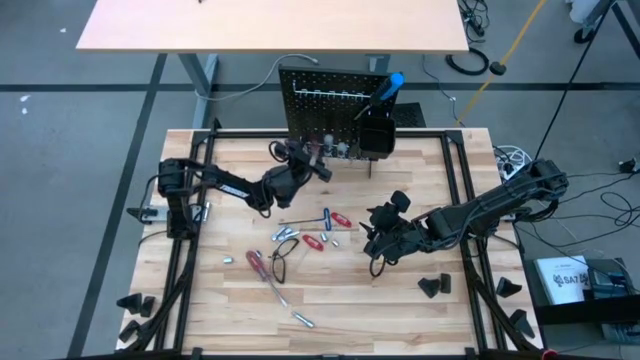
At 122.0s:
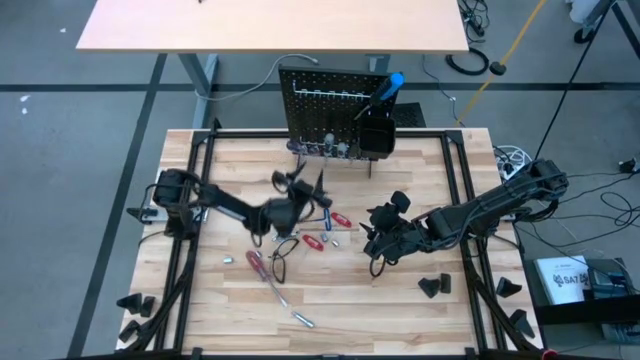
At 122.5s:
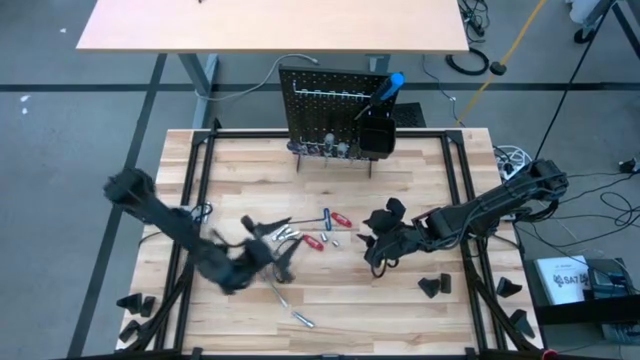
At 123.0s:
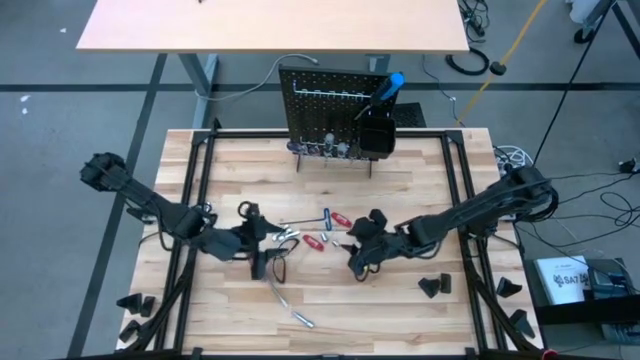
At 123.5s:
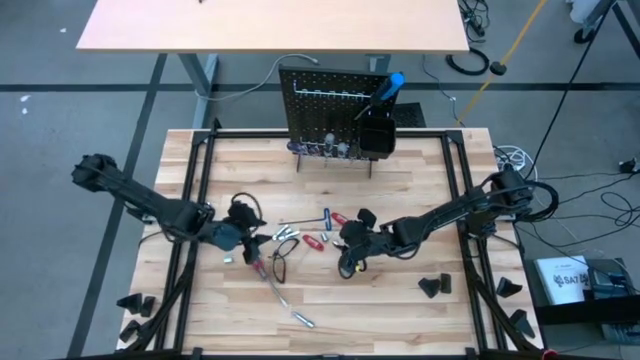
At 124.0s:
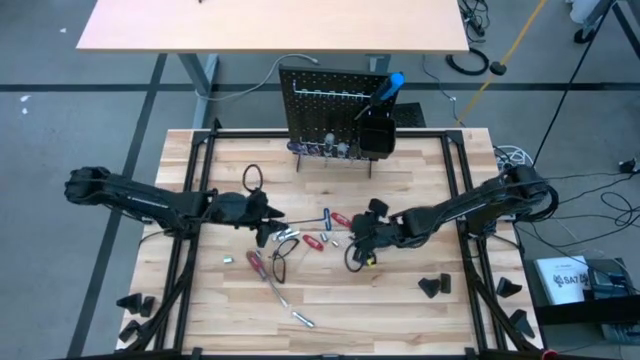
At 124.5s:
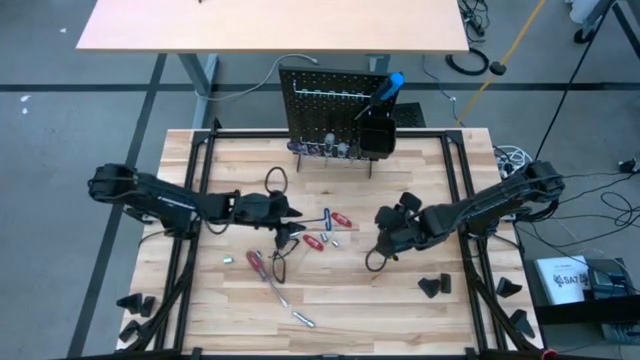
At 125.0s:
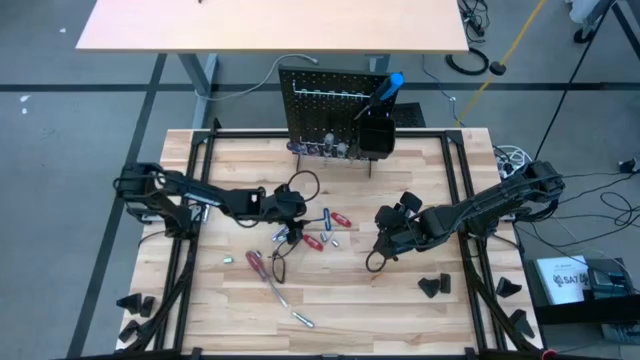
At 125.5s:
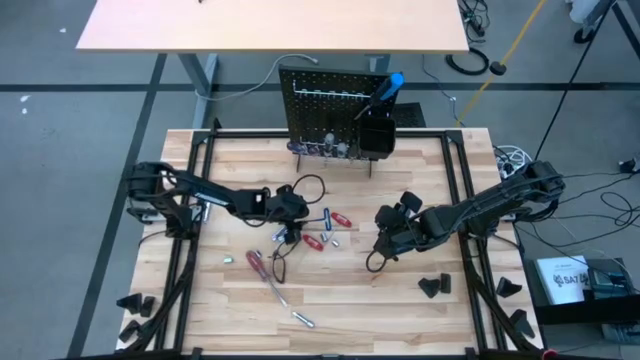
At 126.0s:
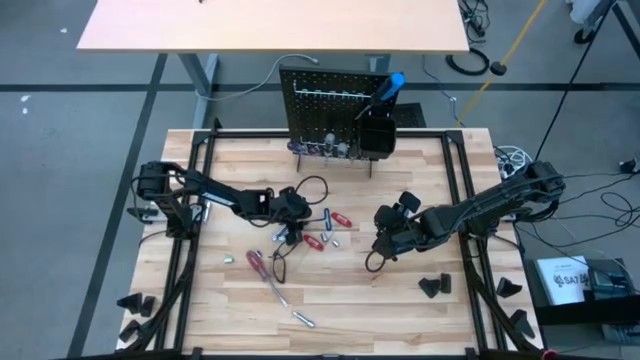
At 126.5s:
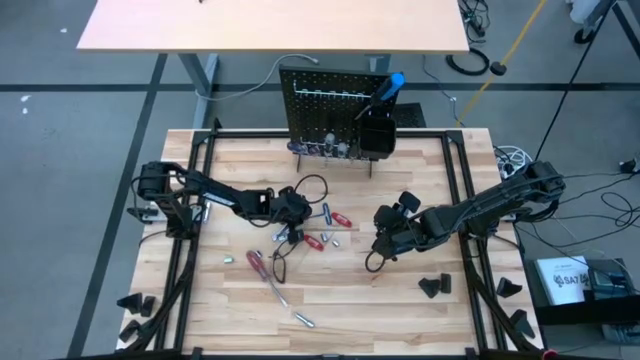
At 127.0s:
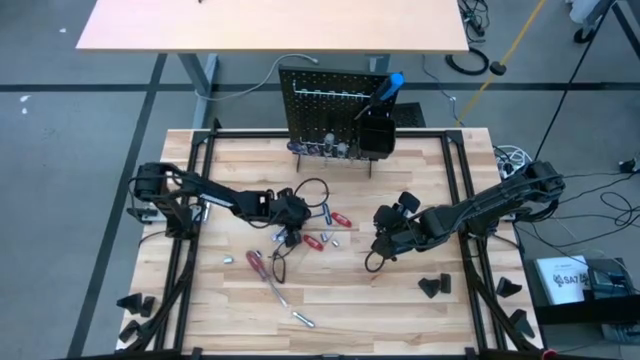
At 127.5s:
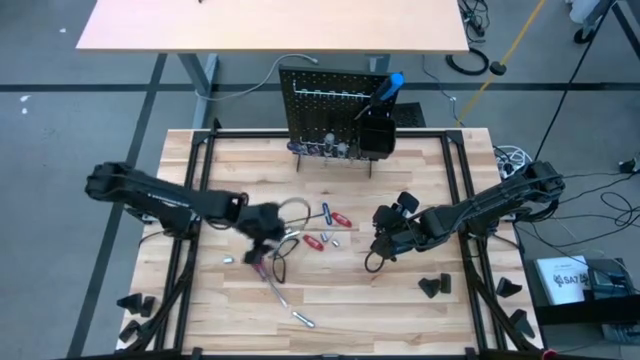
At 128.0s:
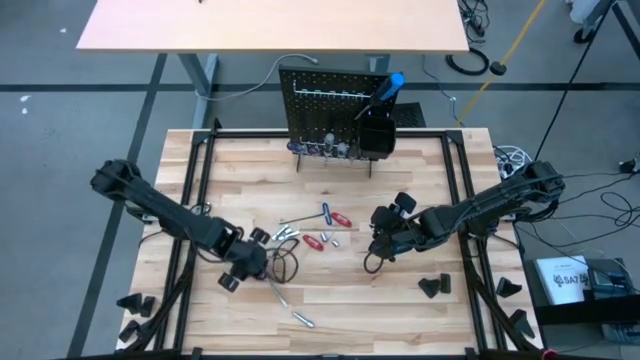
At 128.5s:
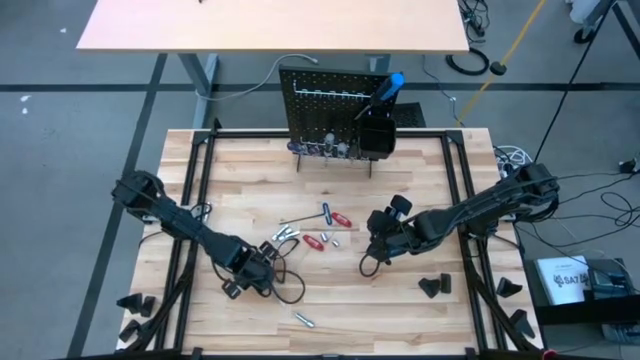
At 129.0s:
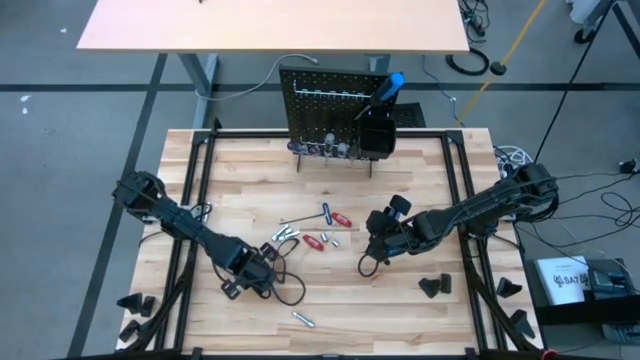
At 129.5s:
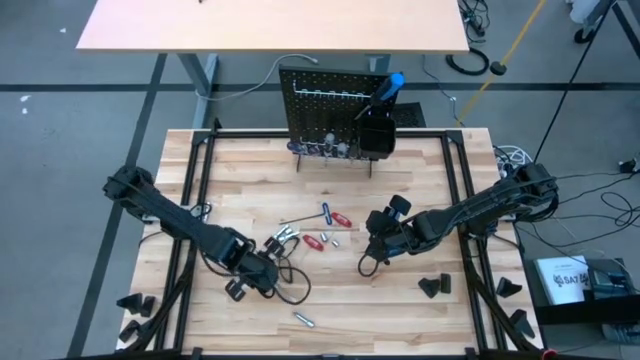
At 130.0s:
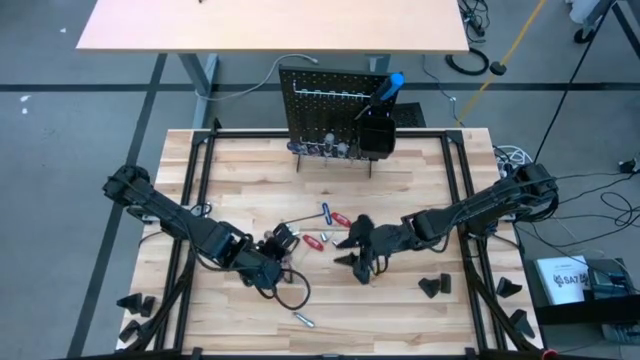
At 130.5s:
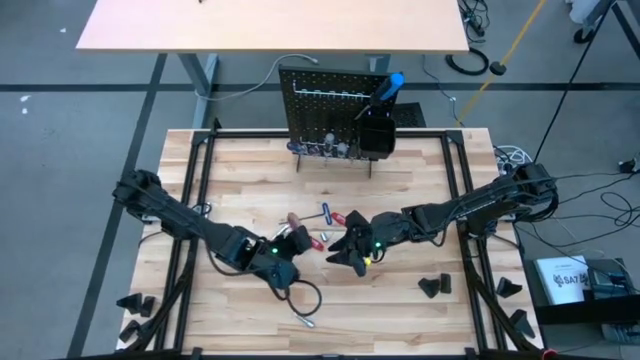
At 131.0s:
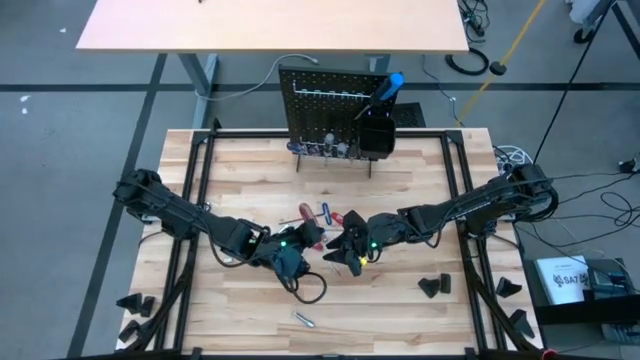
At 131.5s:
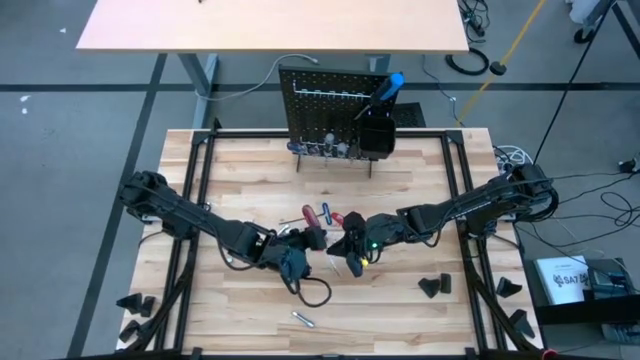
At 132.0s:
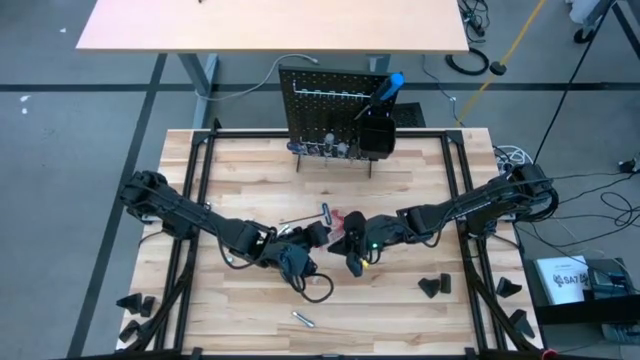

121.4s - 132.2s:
Task: Hang tools onto peg board
Hang the red screwdriver onto the peg board

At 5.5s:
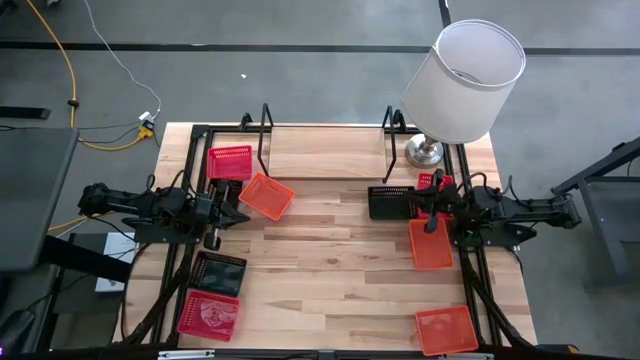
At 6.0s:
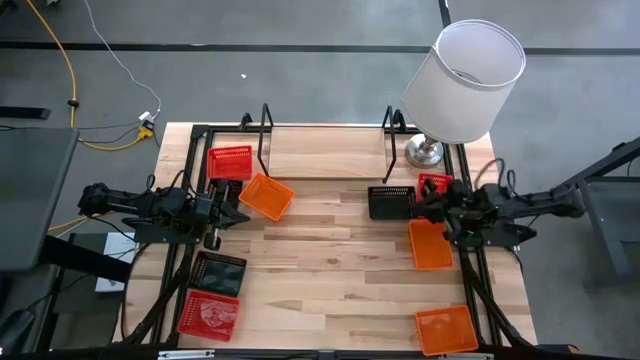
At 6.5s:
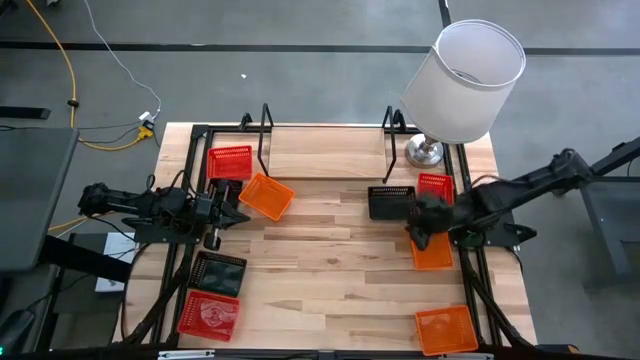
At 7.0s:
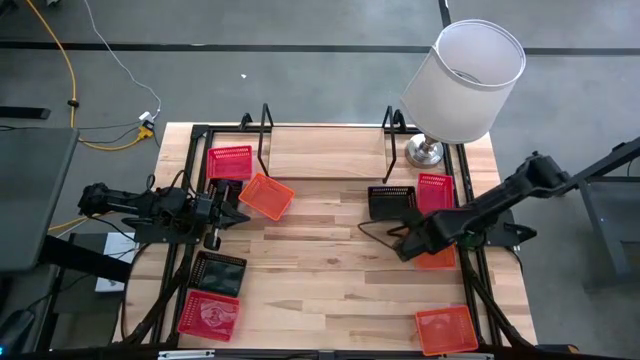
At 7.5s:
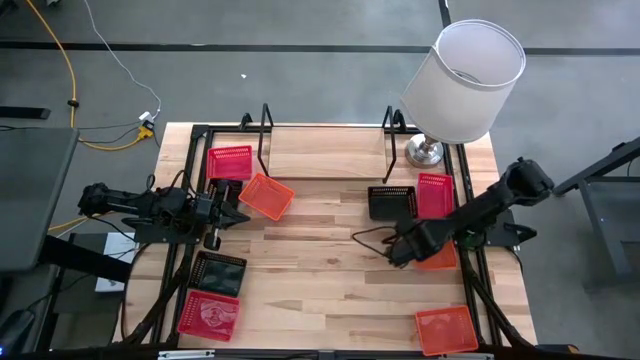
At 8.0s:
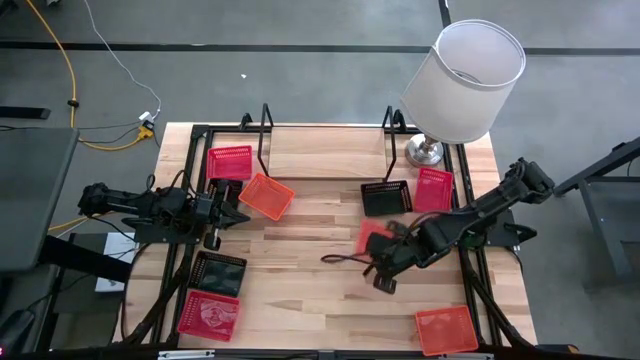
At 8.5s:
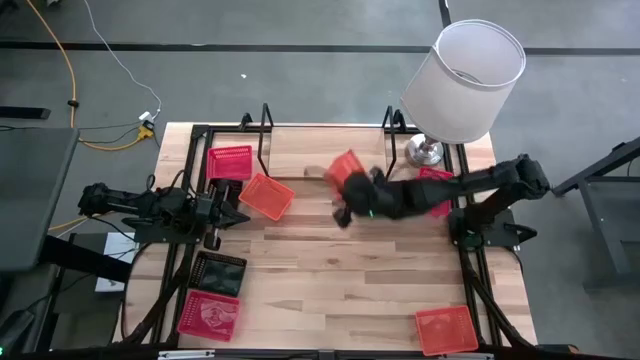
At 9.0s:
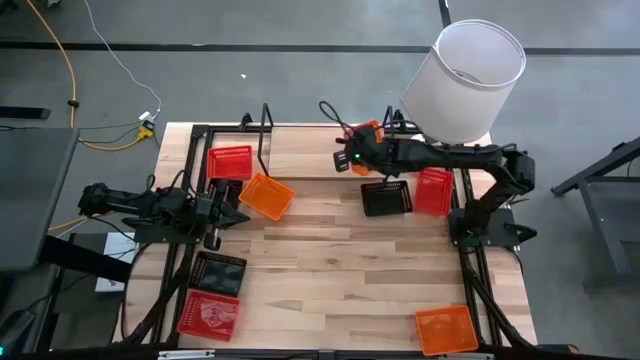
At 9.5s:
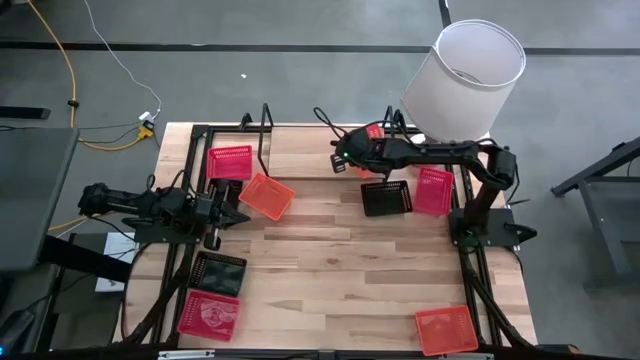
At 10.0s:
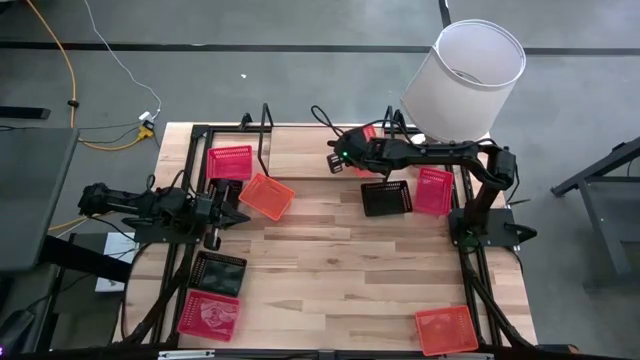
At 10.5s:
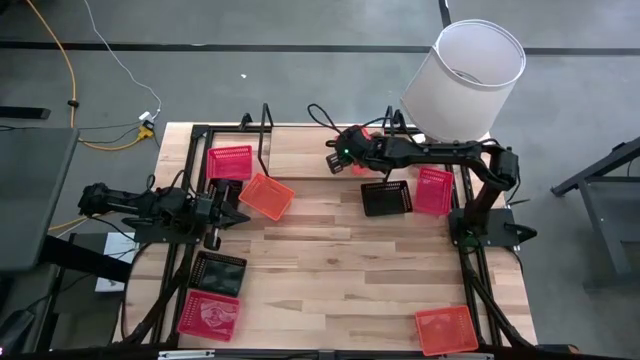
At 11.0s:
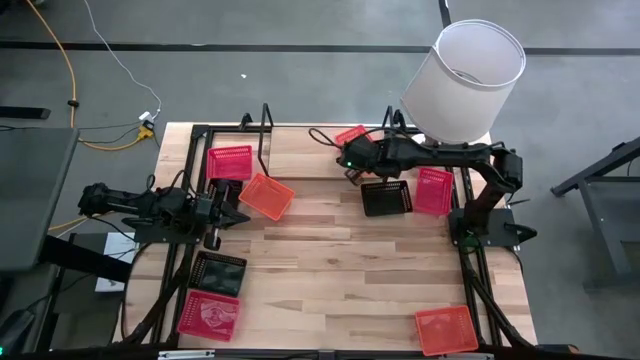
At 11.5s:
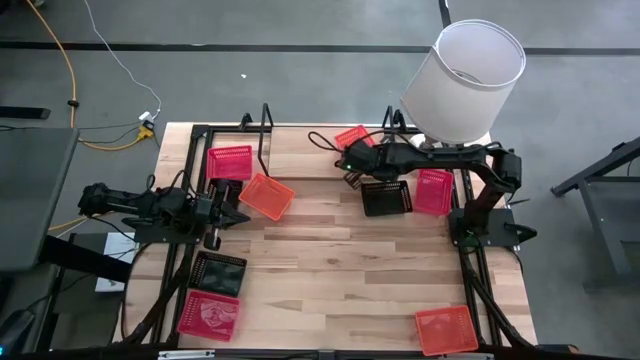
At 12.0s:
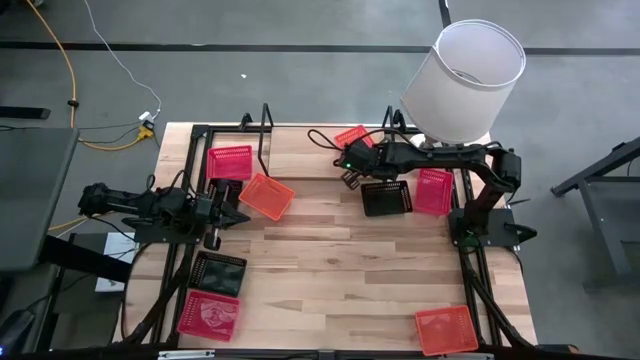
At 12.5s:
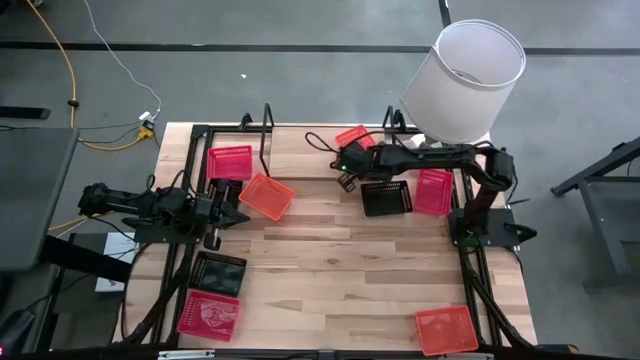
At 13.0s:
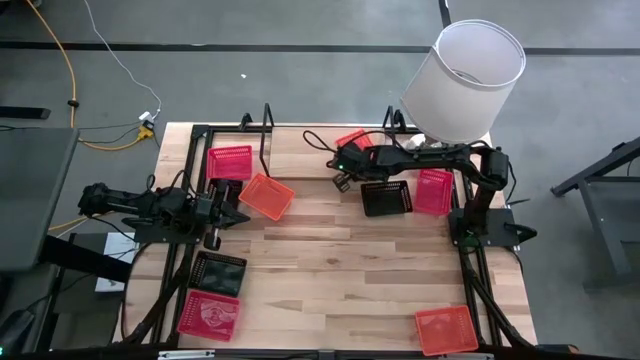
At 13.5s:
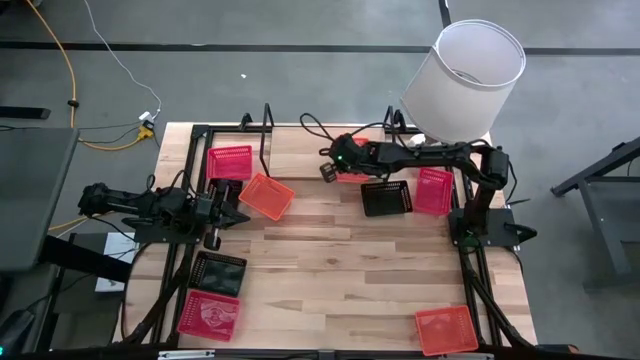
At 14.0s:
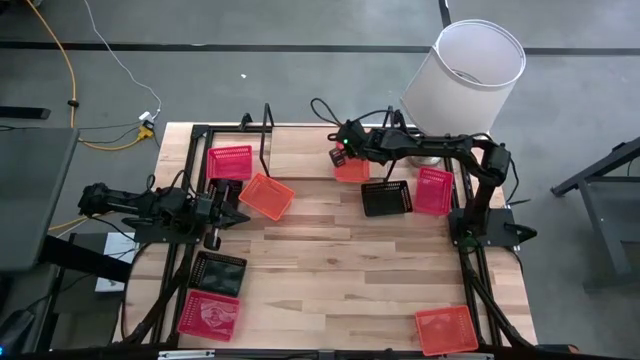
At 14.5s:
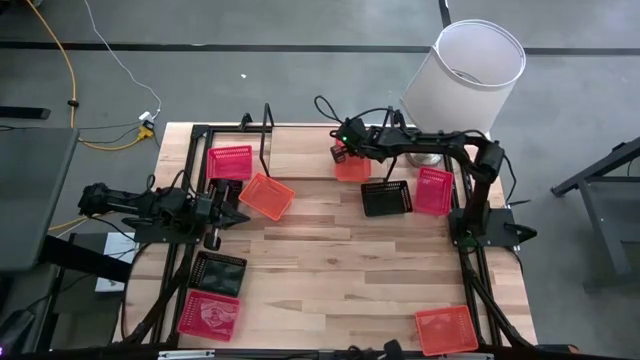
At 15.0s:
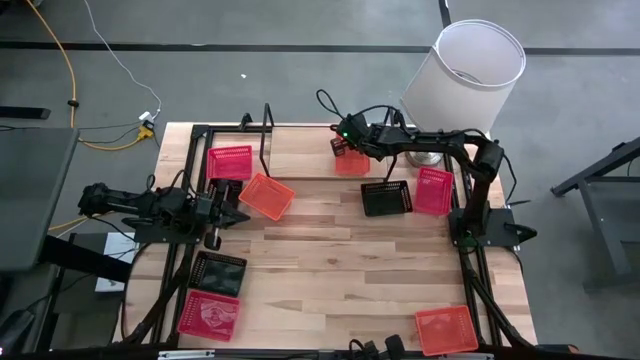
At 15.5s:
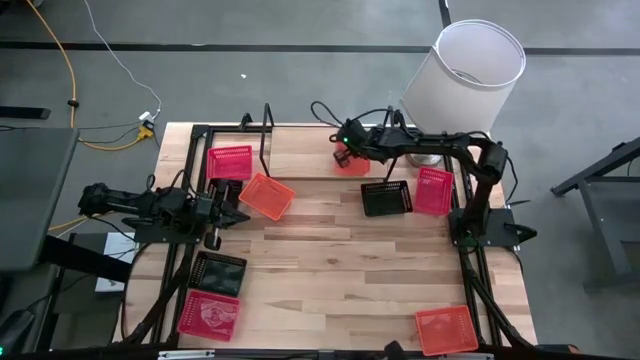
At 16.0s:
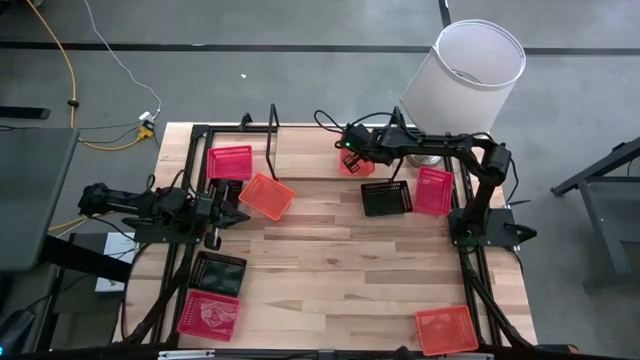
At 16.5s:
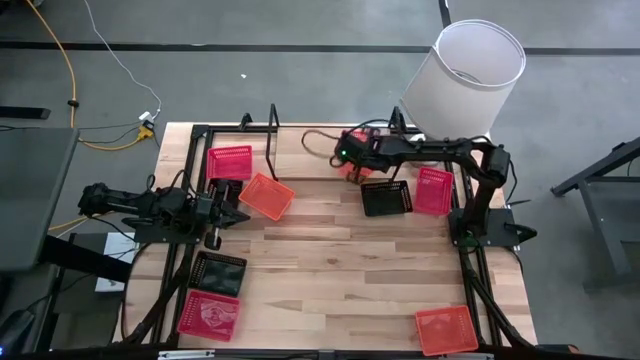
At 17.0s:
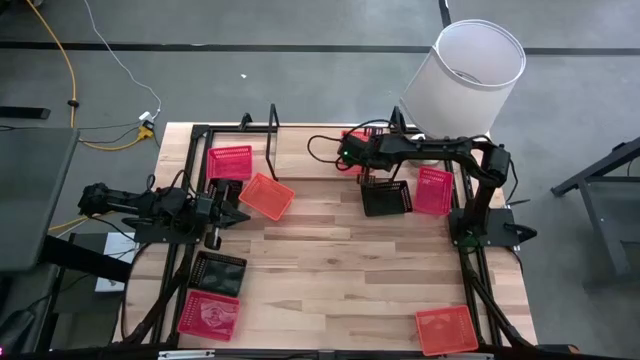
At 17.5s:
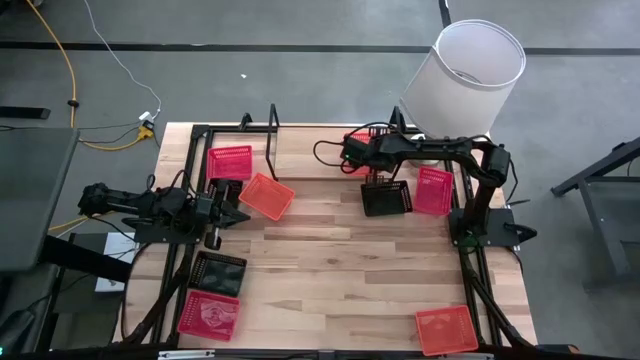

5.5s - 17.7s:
Task: Stack baskets on shelf by color
Put the middle orange basket on the shelf
